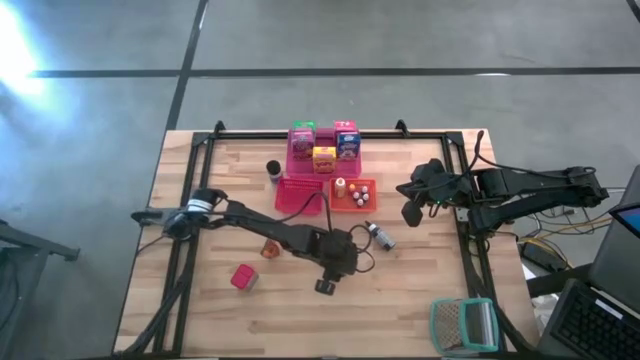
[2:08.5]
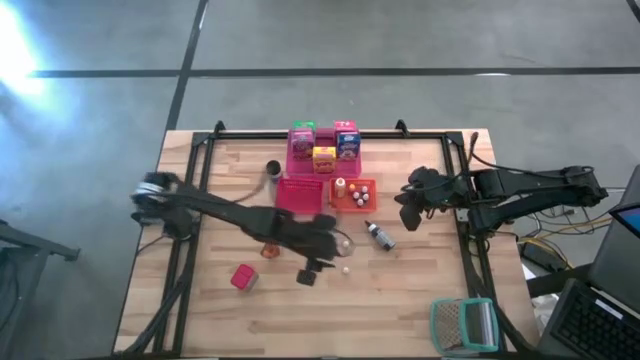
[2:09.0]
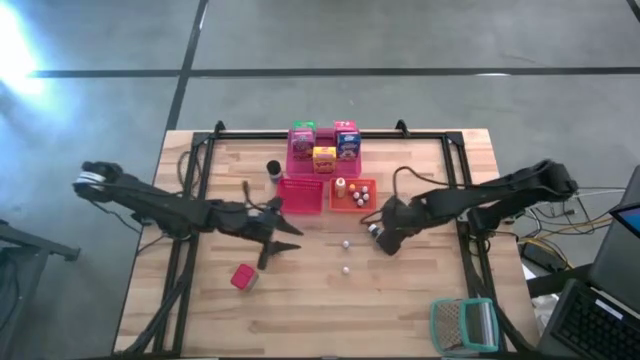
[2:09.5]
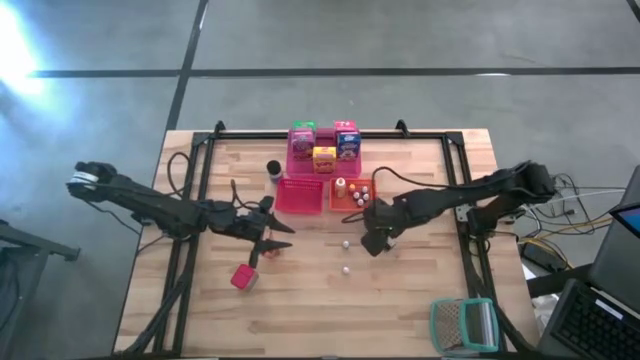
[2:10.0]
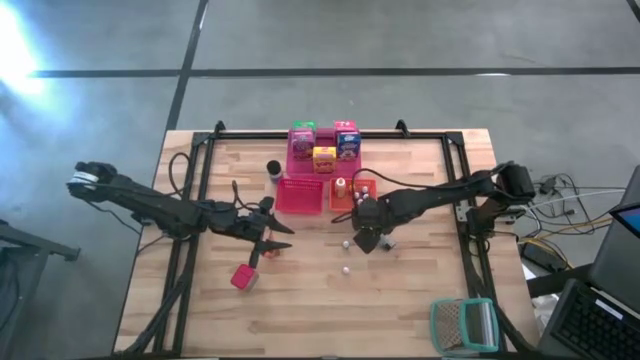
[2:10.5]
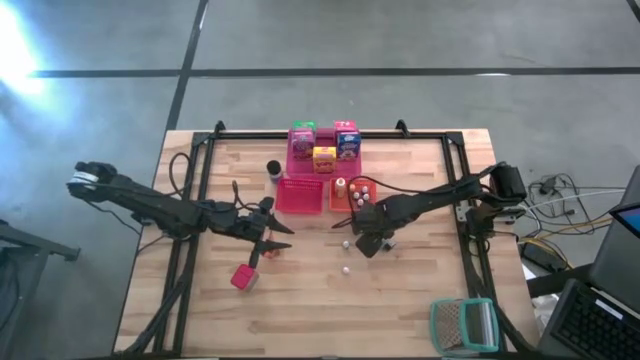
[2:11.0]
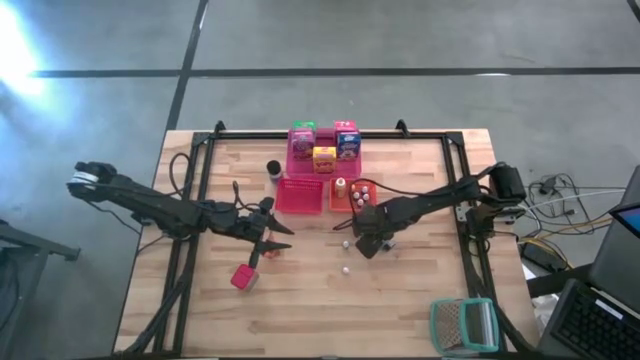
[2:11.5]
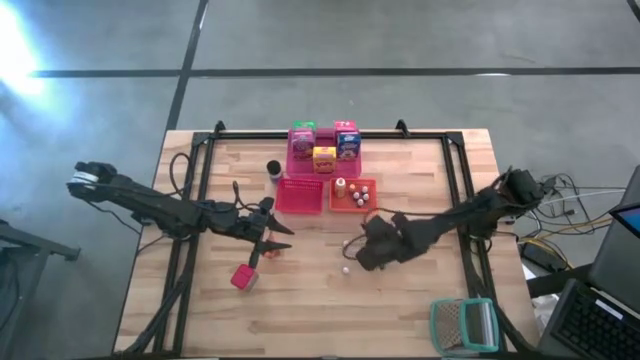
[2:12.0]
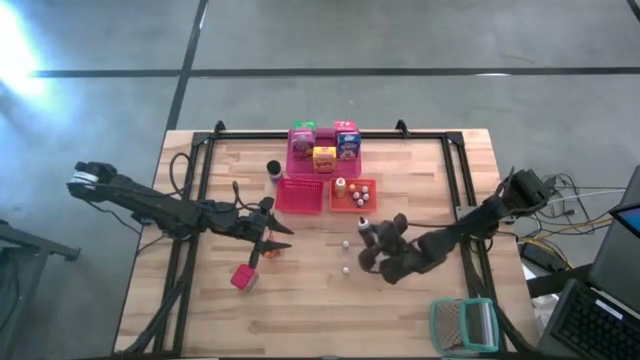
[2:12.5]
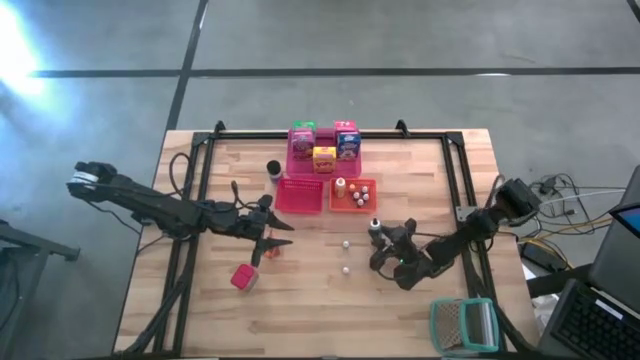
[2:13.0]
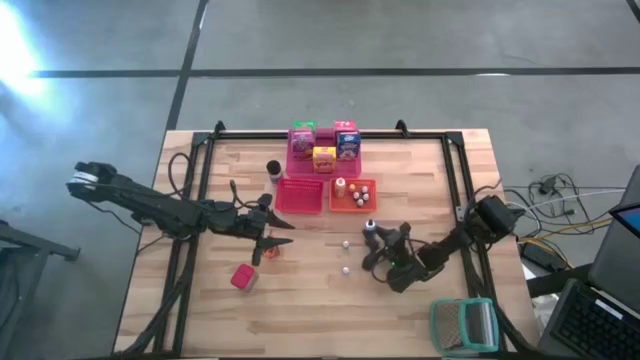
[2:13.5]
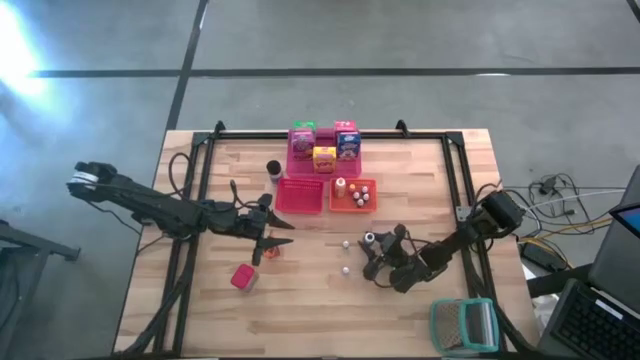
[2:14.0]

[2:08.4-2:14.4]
Task: Pick & Place Kitchen Items
Adjust the large black food coloring bottle on the table

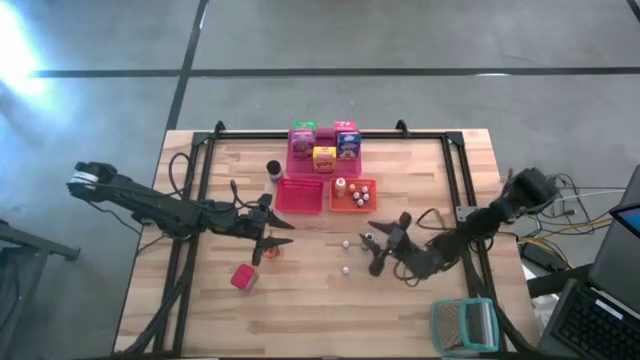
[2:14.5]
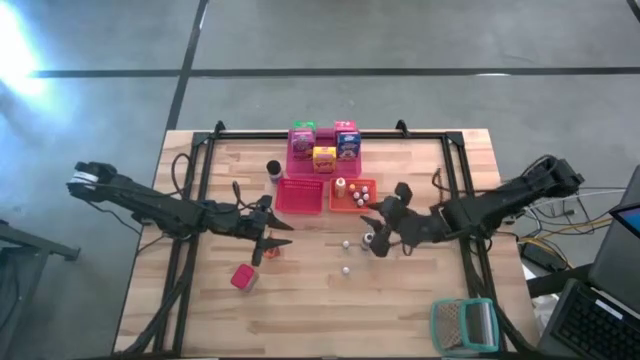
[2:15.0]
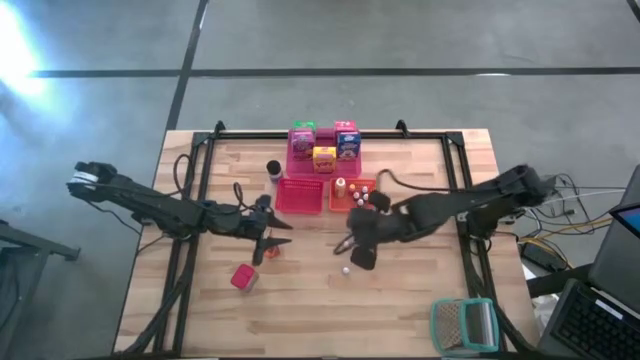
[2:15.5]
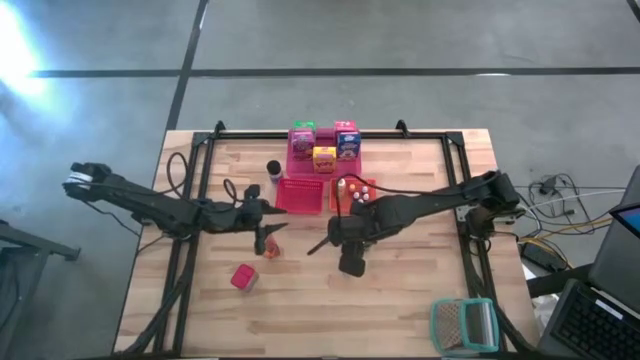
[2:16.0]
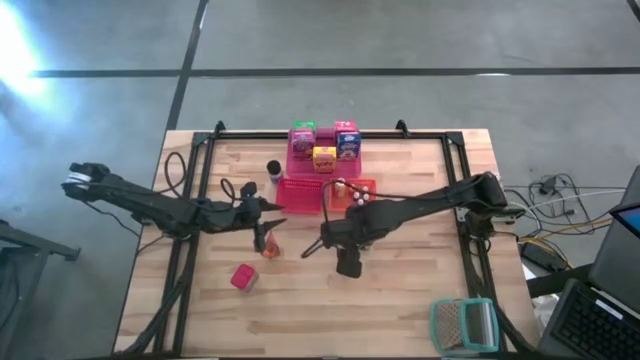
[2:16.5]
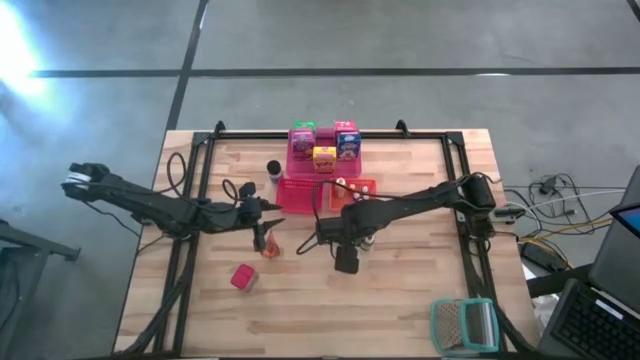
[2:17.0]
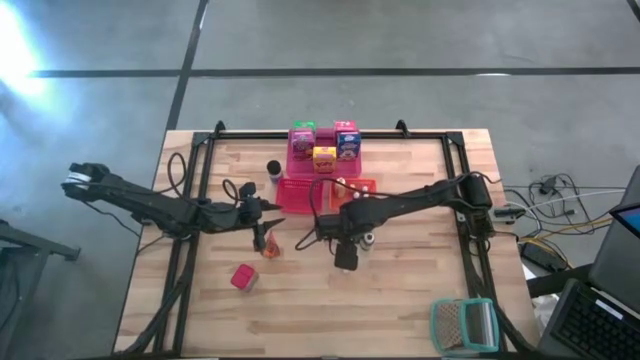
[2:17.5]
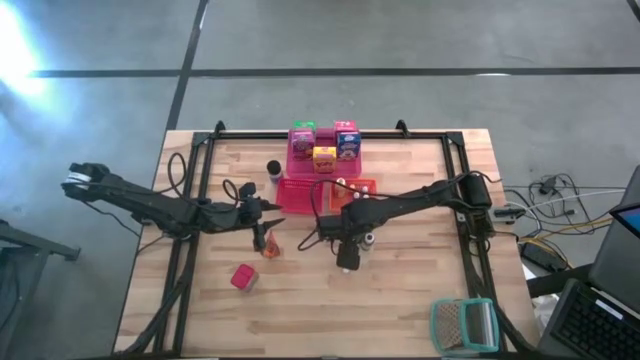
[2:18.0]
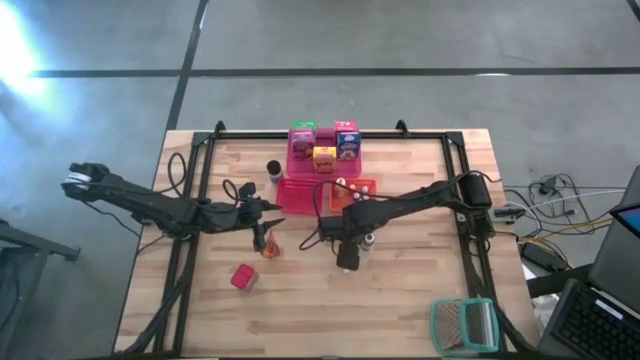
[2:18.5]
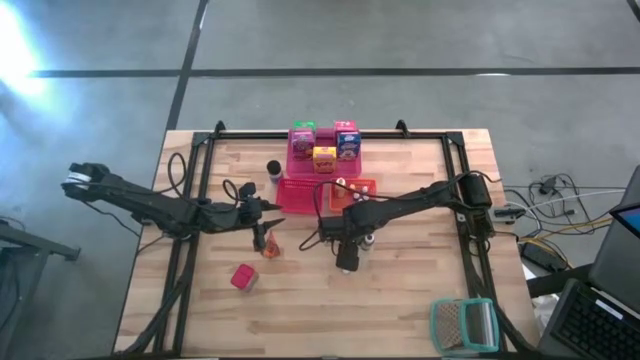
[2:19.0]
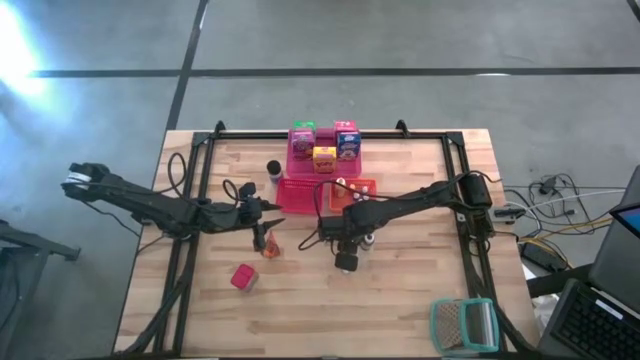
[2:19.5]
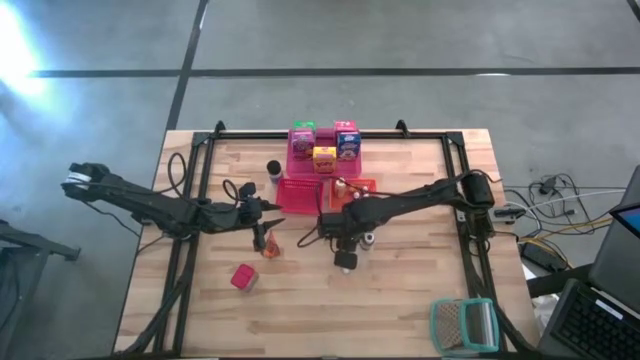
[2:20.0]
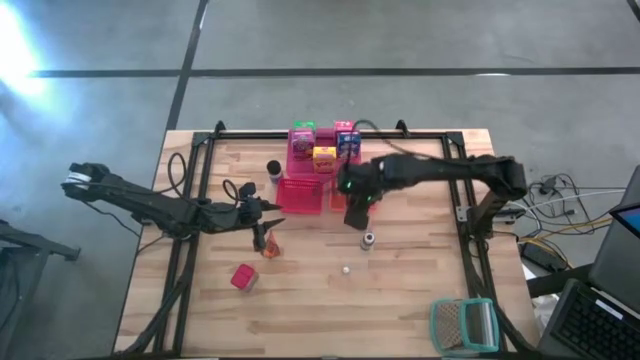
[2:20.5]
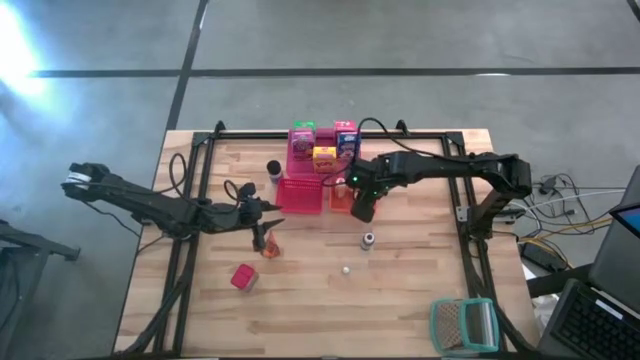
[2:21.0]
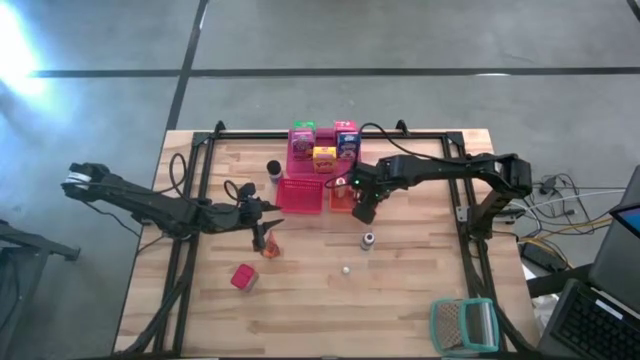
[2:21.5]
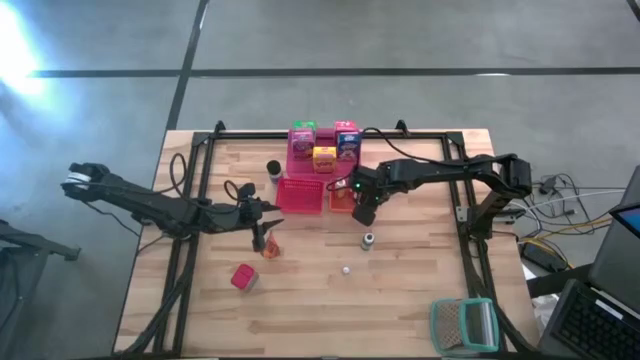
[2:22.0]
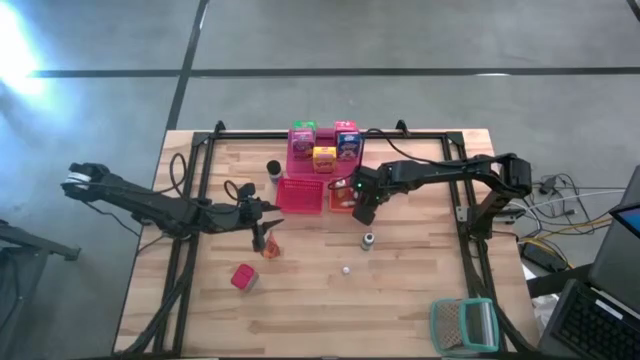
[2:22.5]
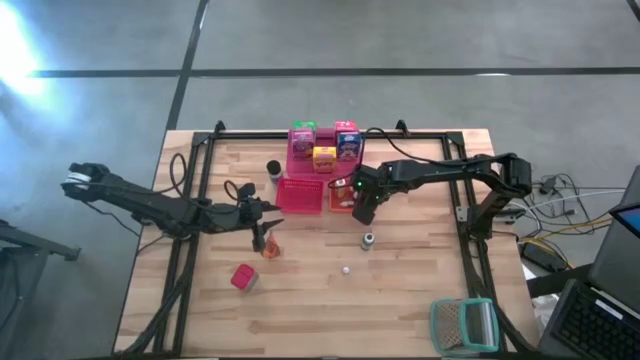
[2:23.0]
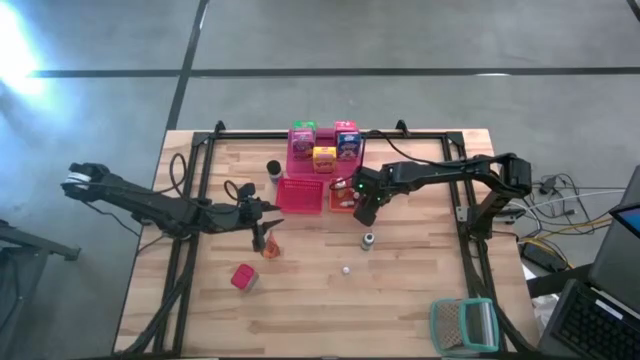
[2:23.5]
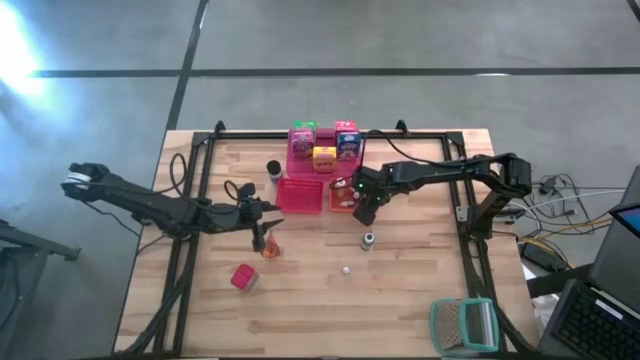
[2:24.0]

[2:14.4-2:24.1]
Put the small violet food coloring bottle into the orange bin

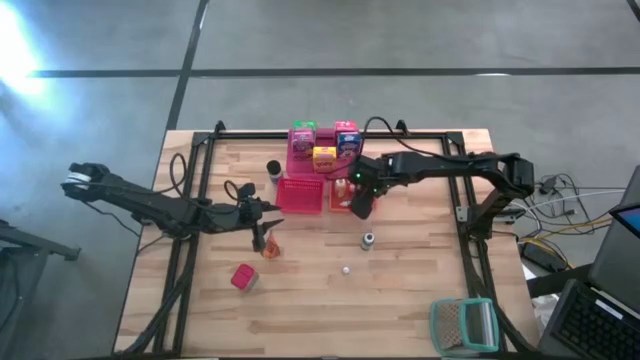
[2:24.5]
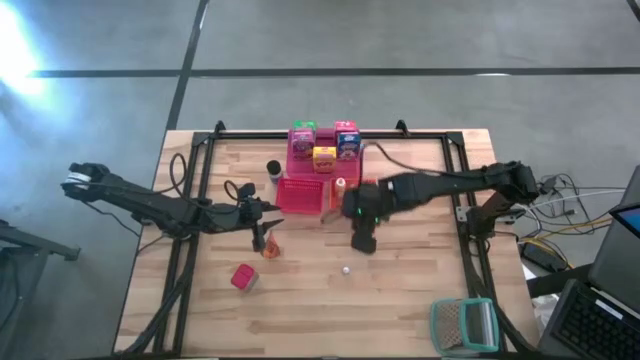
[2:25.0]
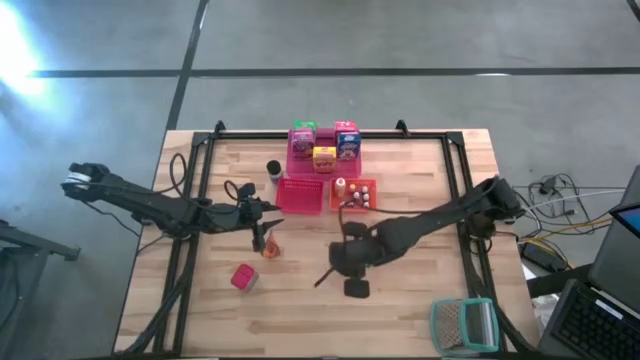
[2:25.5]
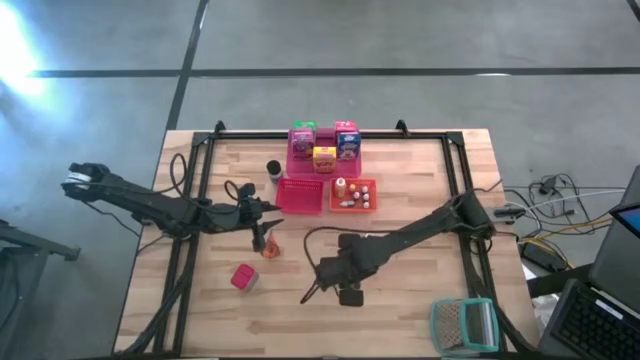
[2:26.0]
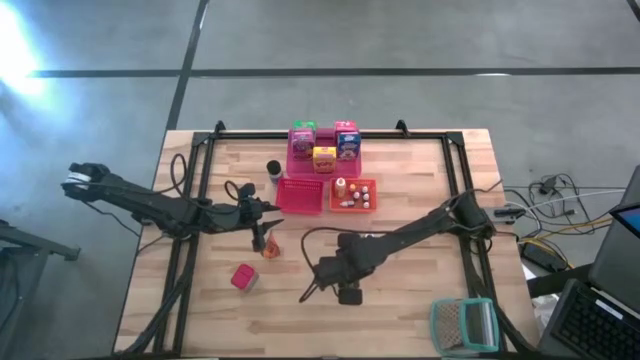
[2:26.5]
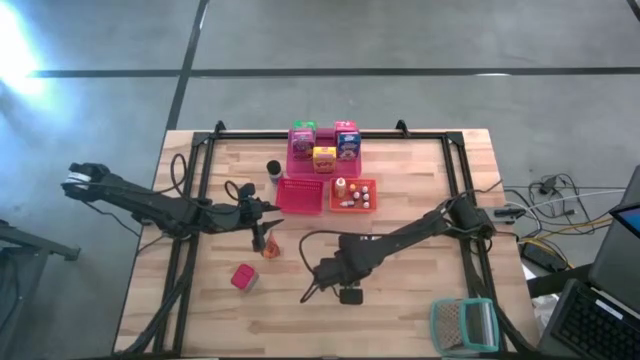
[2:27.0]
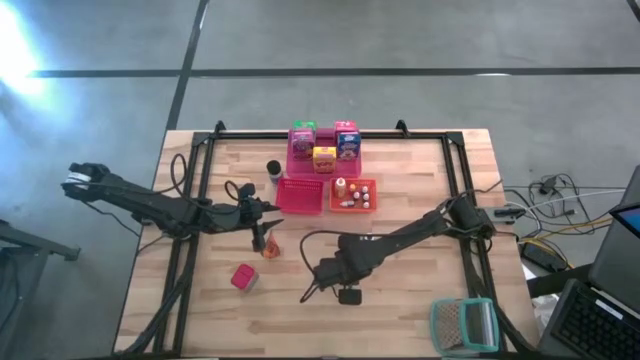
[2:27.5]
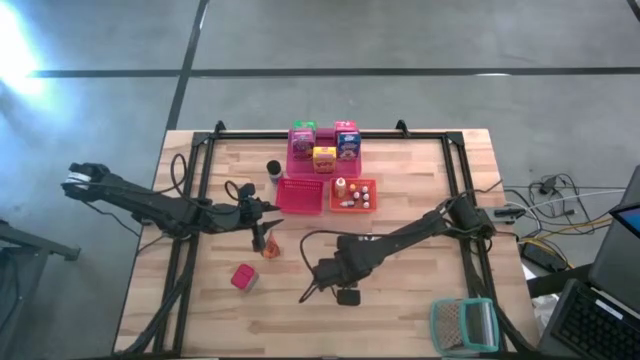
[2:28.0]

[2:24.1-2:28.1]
Put the small red food coloring bottle into the orange bin

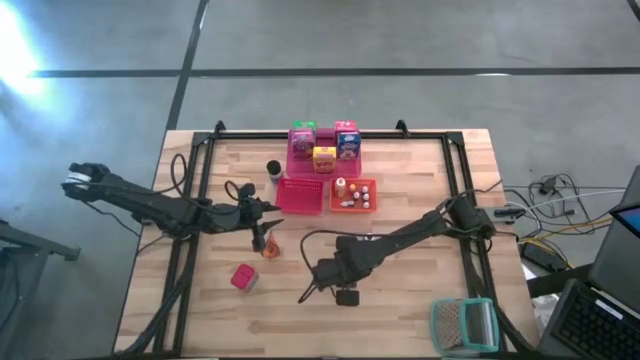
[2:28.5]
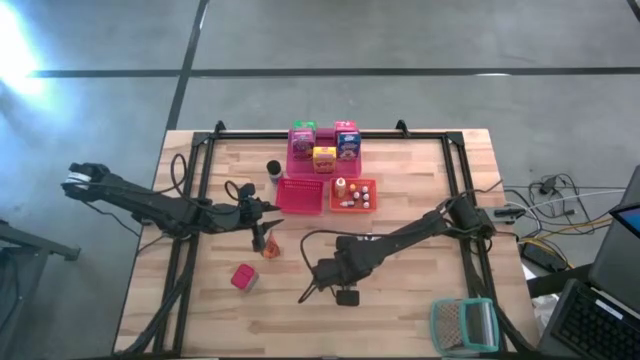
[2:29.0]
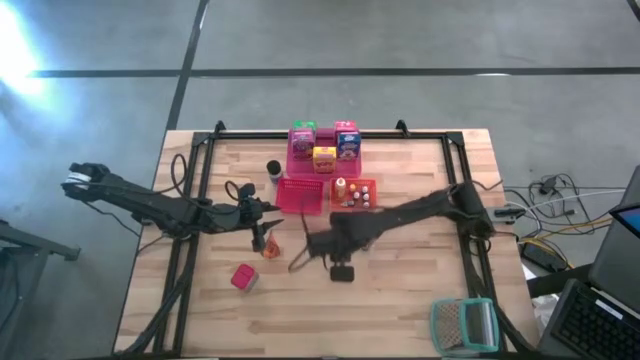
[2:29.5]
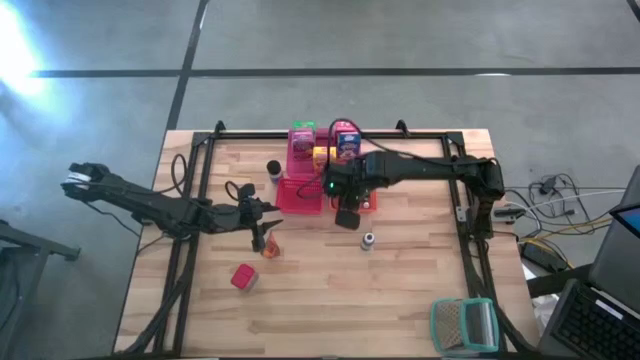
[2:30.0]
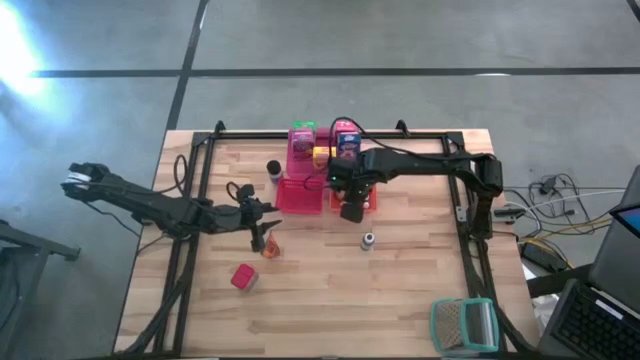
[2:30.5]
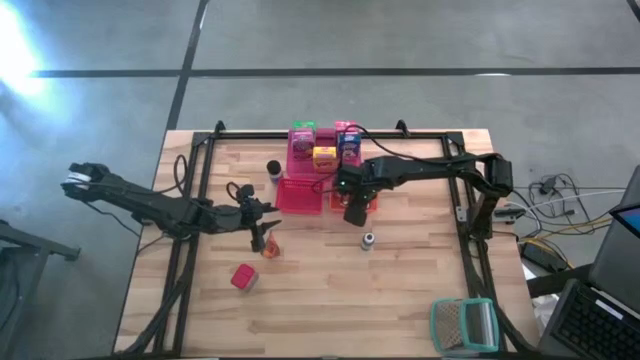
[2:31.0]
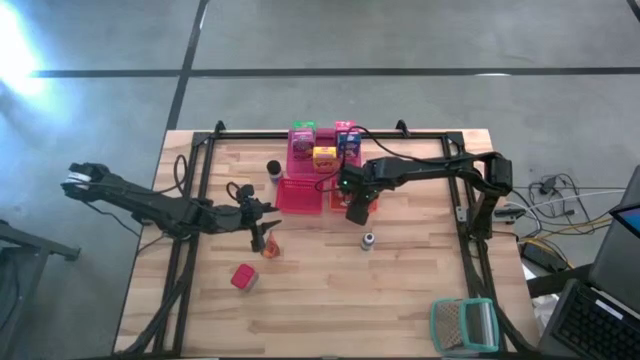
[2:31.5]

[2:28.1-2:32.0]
Put the small red food coloring bottle into the orange bin
